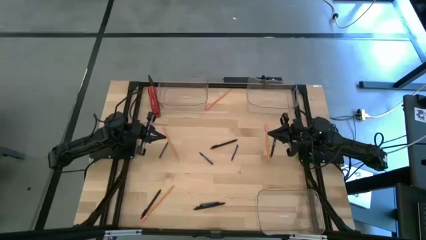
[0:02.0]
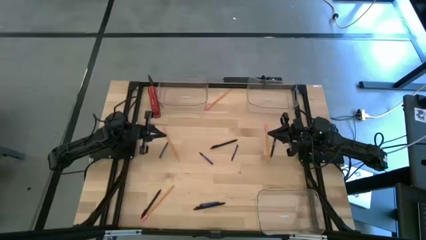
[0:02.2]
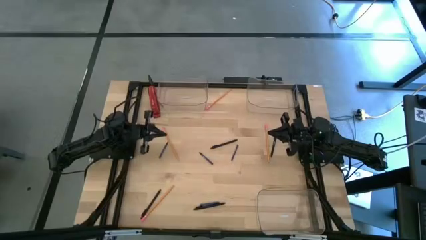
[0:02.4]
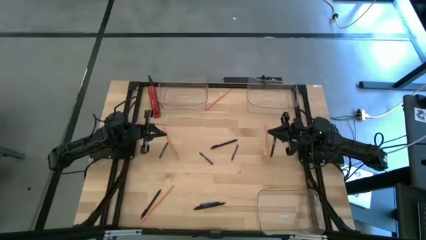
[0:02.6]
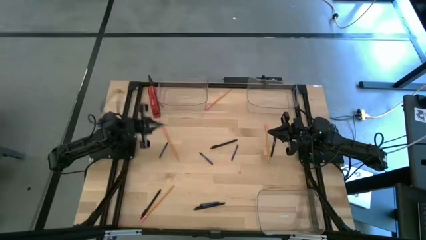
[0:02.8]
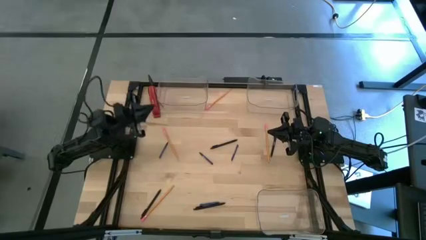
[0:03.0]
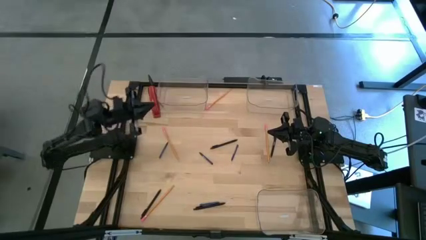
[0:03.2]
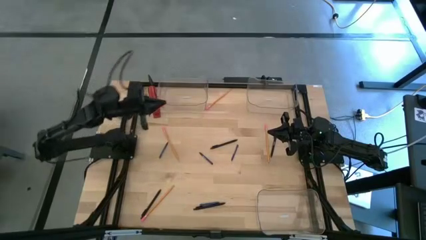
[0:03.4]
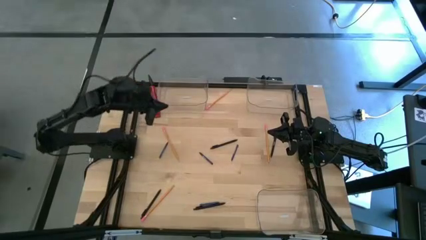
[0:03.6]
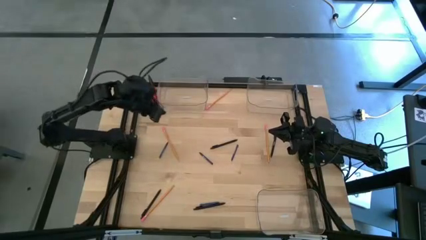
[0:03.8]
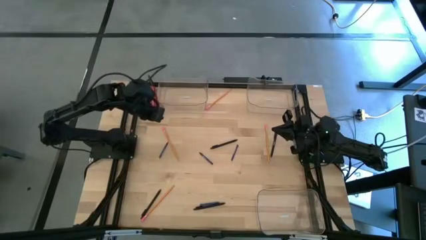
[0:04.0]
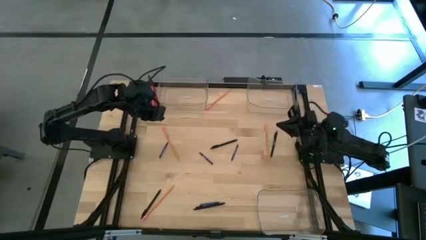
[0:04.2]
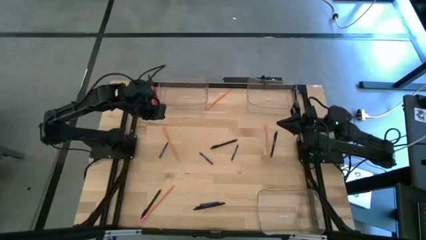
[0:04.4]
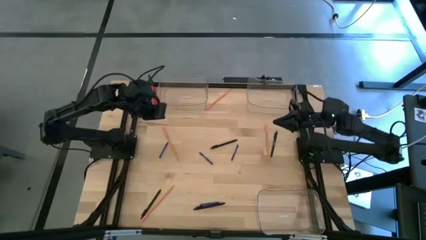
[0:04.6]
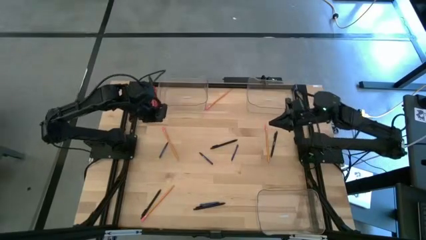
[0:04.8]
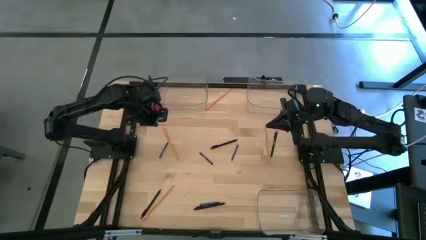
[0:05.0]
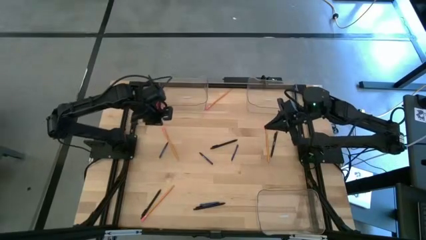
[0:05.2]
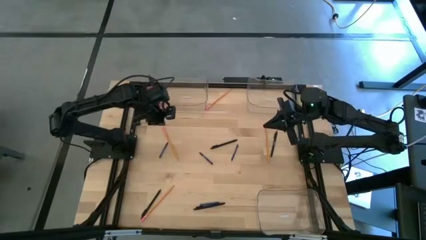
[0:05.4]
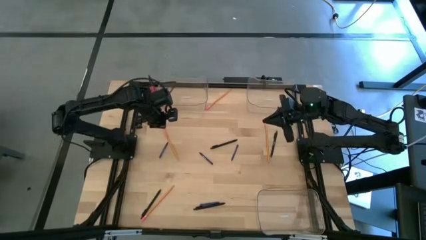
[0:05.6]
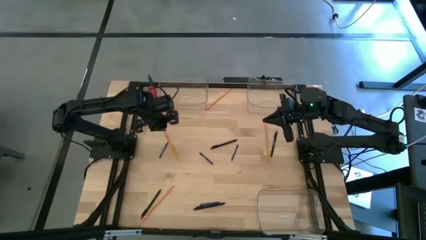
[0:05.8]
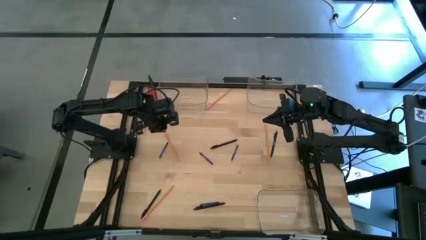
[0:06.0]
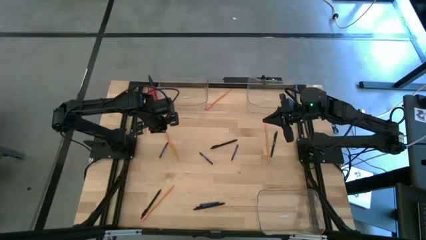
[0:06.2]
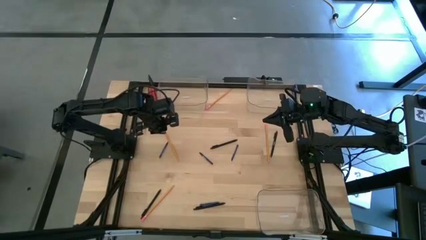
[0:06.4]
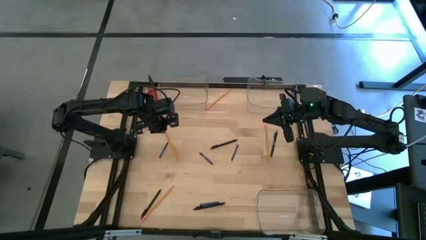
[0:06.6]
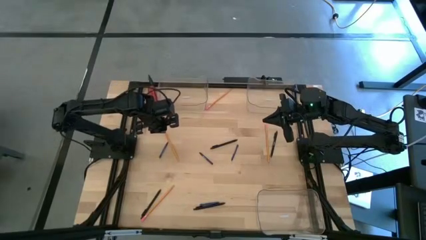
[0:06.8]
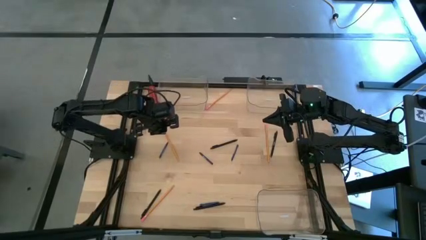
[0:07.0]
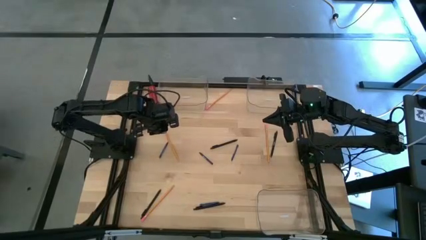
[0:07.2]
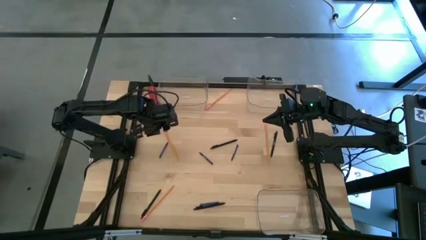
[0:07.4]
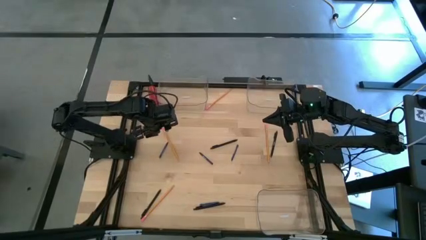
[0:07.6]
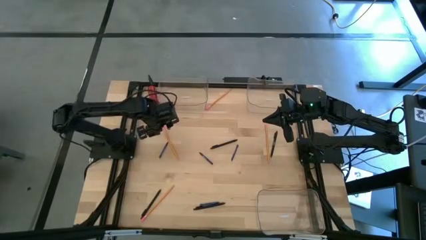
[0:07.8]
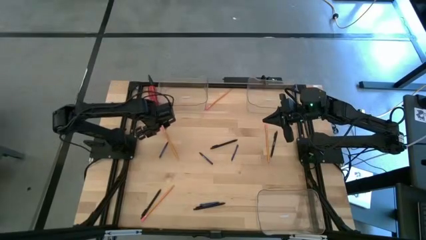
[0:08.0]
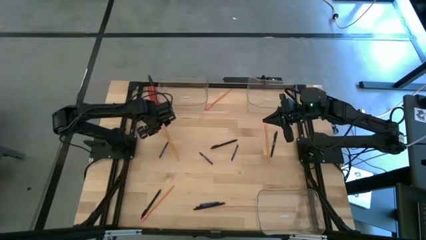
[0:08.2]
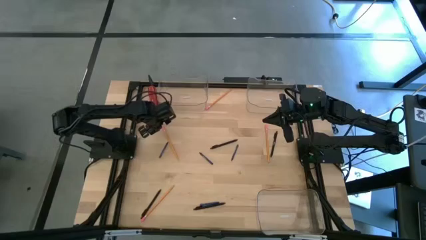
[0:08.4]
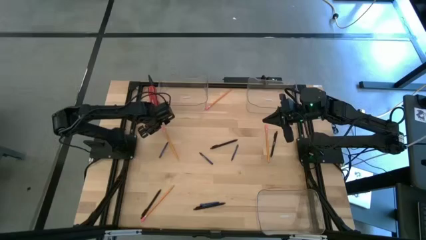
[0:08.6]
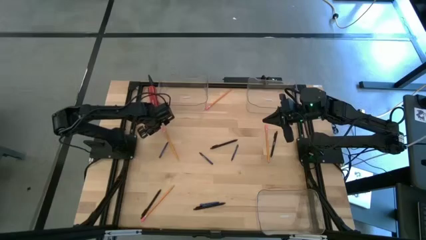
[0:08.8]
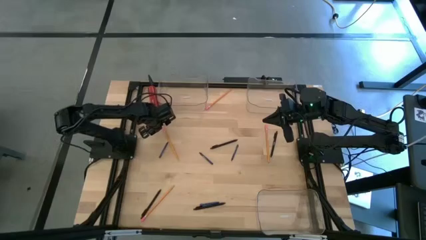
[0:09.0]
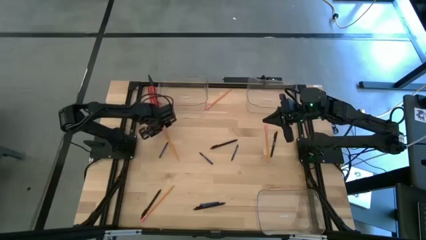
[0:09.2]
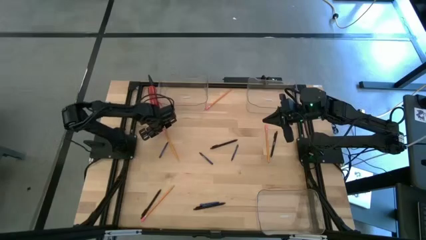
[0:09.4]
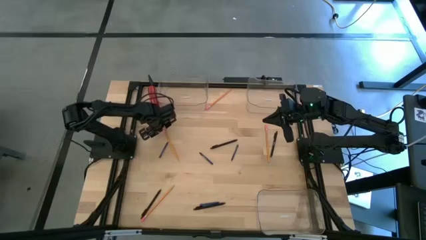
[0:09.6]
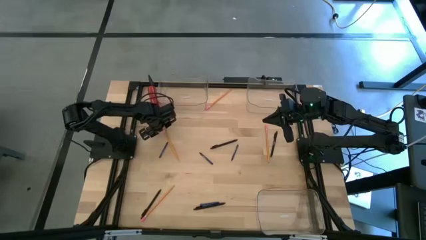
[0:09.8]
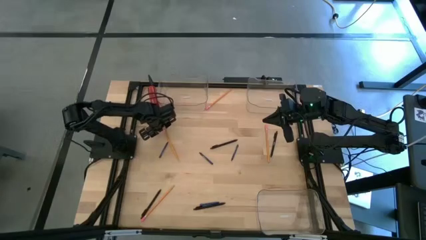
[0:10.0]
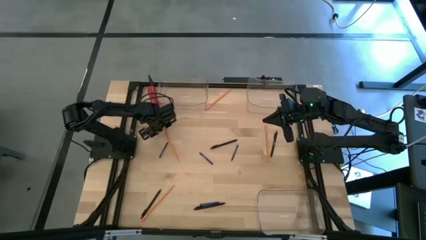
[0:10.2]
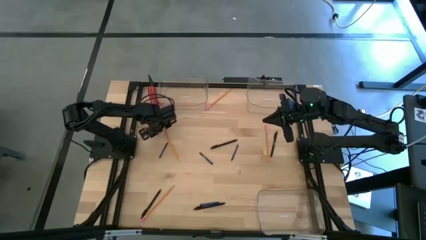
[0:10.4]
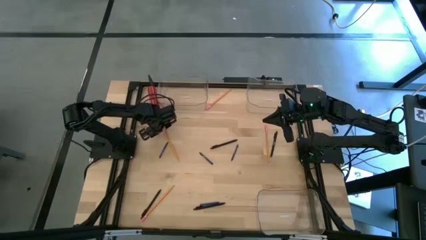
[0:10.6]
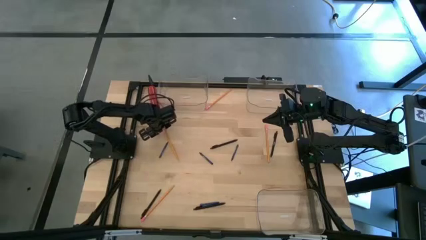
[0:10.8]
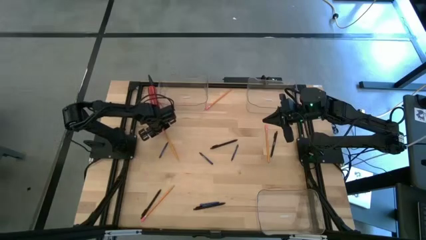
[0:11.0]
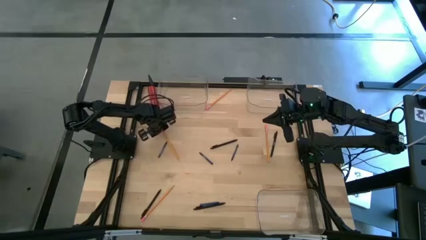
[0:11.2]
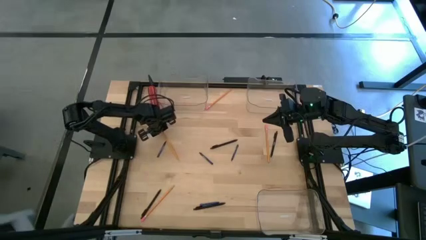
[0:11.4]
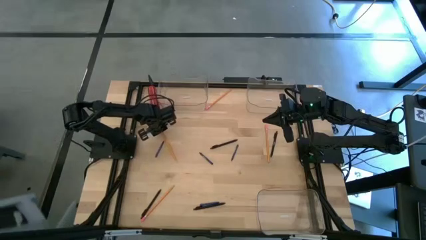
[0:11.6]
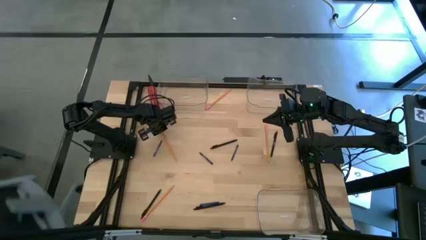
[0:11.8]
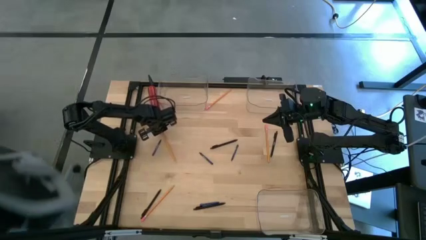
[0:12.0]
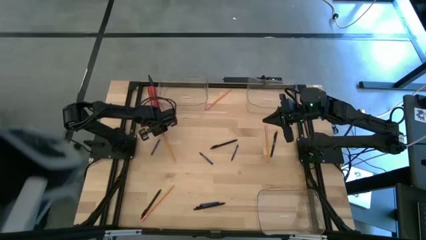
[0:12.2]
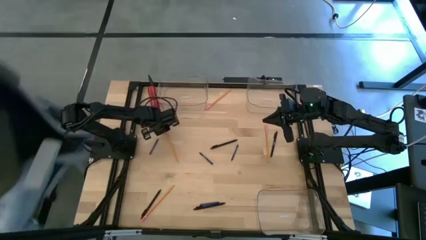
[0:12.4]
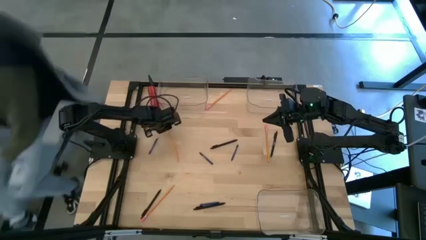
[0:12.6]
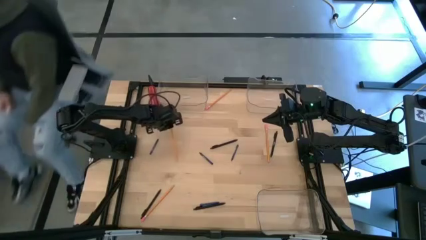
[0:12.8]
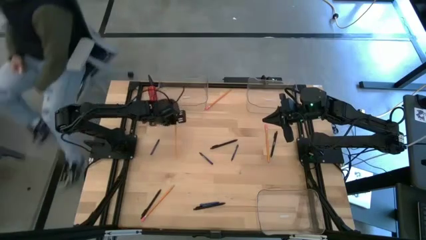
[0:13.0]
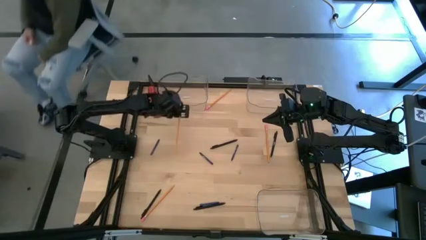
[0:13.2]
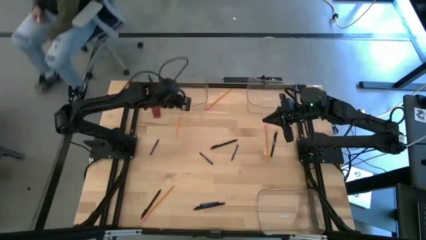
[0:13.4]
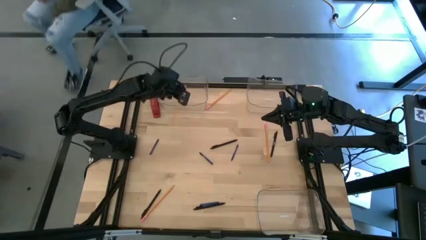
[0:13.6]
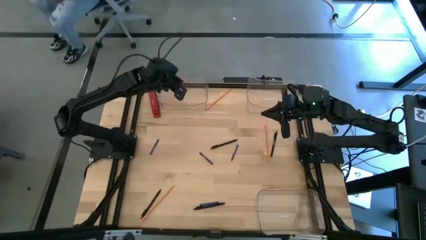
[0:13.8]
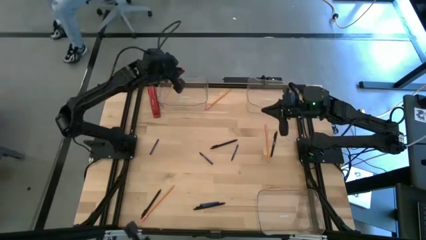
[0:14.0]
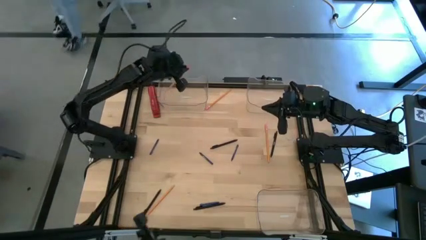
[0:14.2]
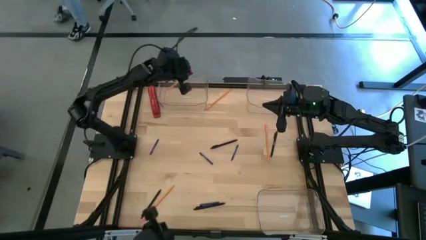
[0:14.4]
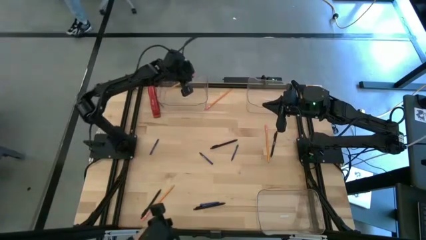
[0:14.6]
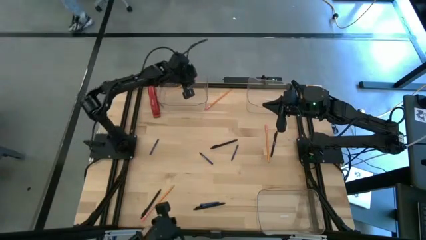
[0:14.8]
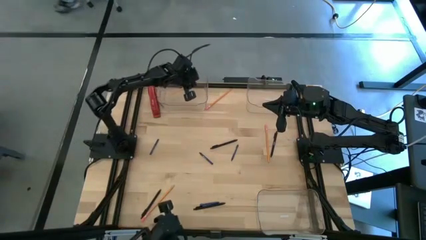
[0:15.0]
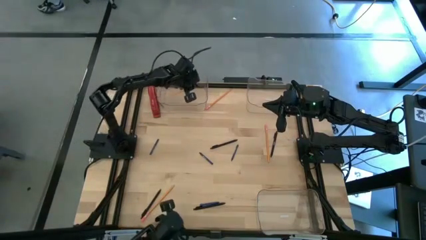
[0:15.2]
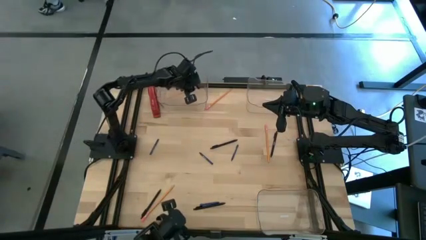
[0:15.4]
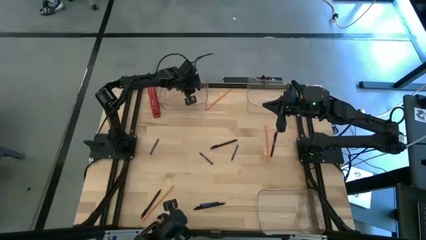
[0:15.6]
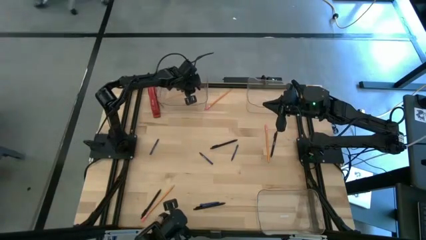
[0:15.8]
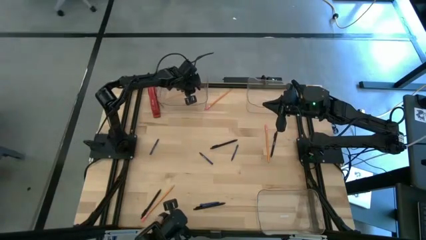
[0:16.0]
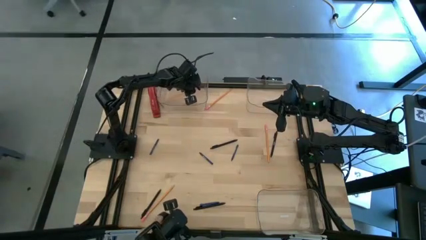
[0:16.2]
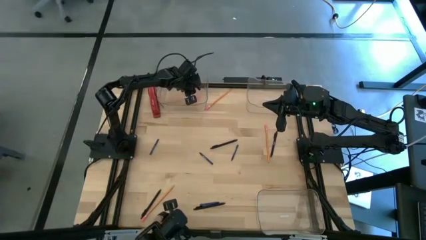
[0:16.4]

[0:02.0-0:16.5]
Task: Sort crayons/erasers/pens/pencils in bins
Put the yellow pencil into the top left transparent bin
